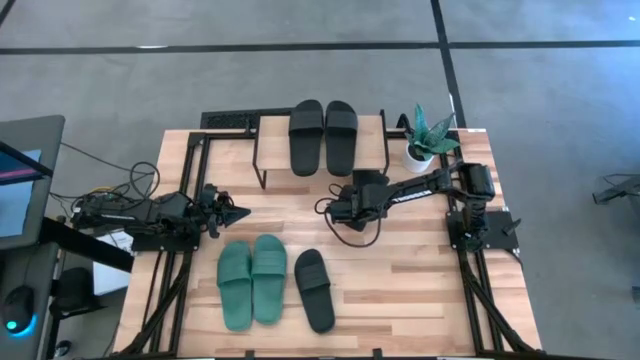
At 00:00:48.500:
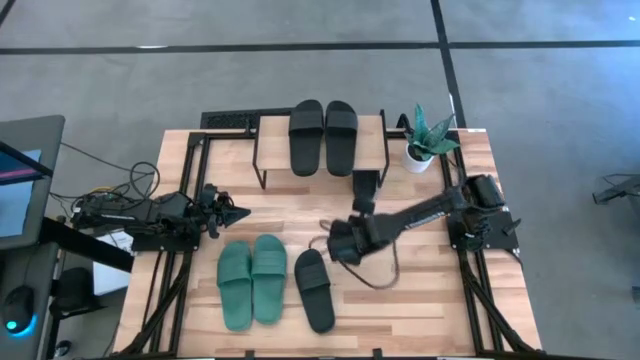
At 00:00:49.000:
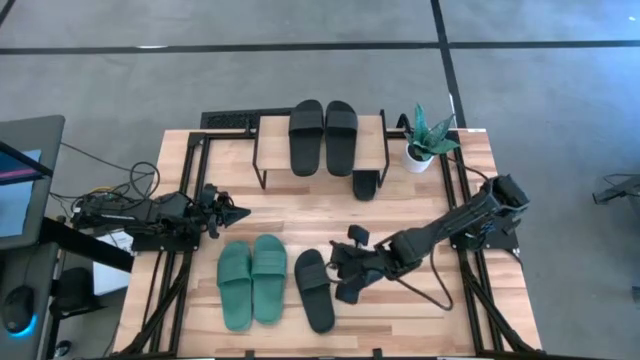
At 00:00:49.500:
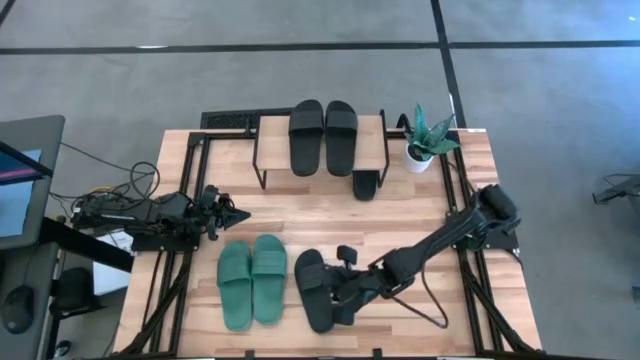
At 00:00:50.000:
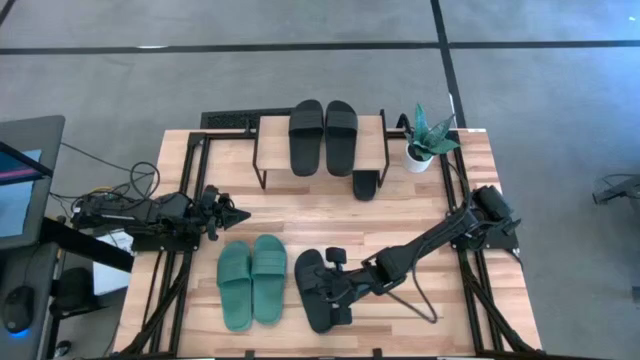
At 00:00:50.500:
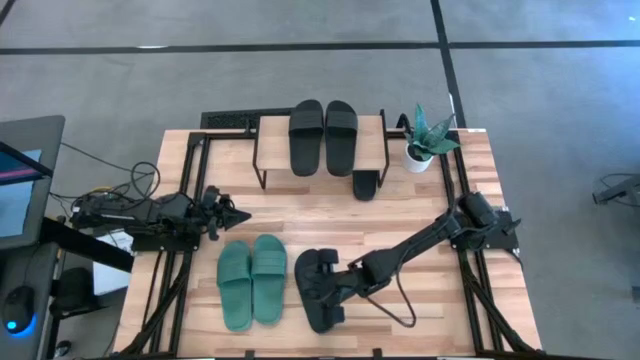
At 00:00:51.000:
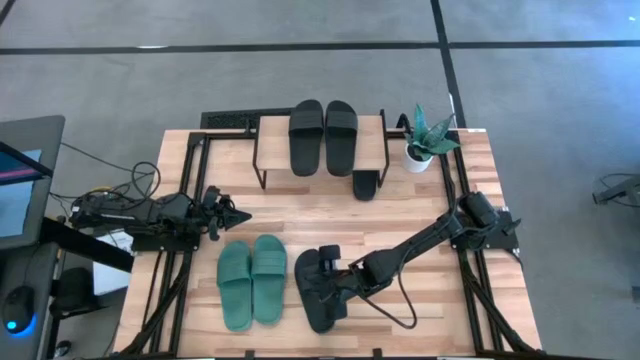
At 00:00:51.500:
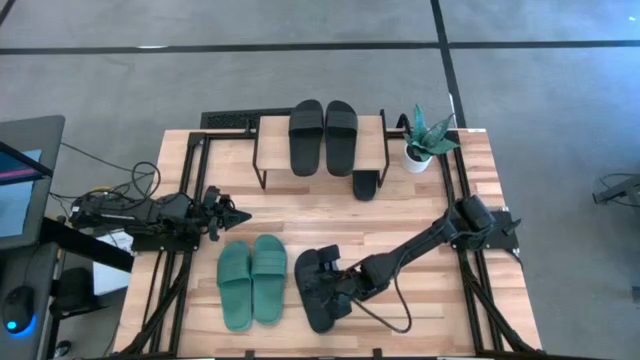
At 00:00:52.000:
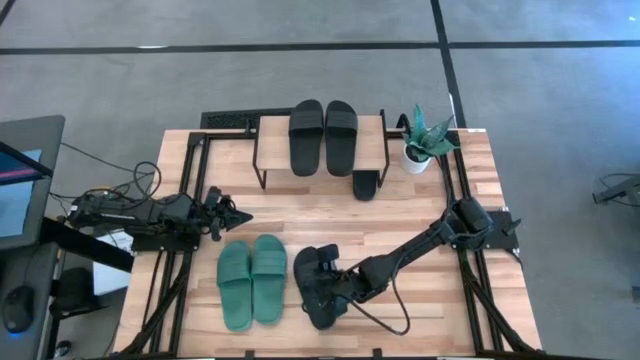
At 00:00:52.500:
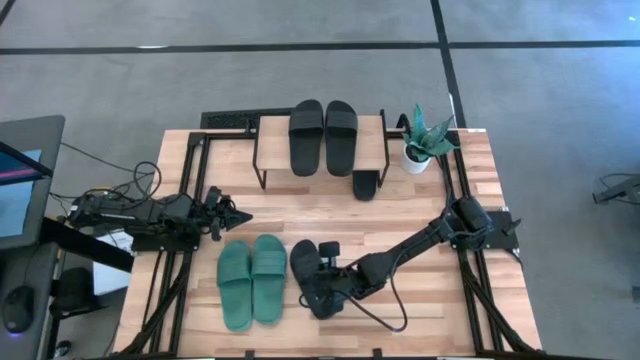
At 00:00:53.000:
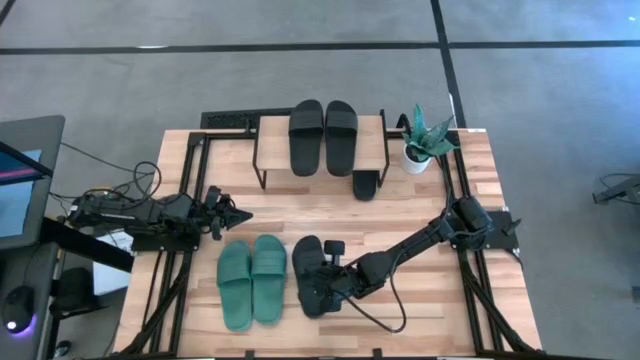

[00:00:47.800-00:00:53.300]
Task: Pick and place slides into the shelf
Put the black slide under the shelf

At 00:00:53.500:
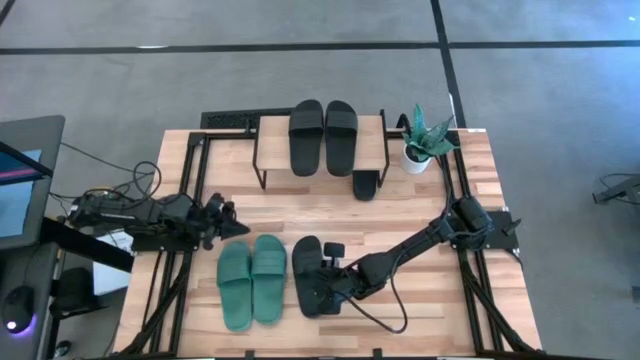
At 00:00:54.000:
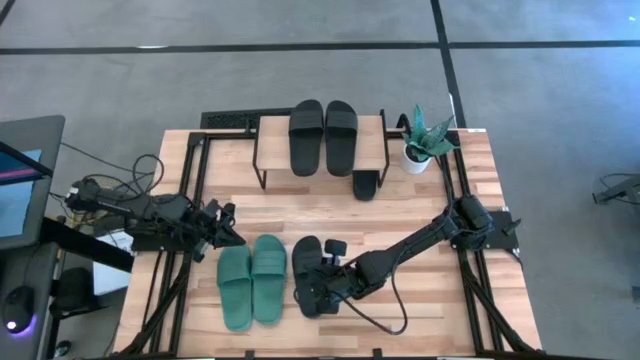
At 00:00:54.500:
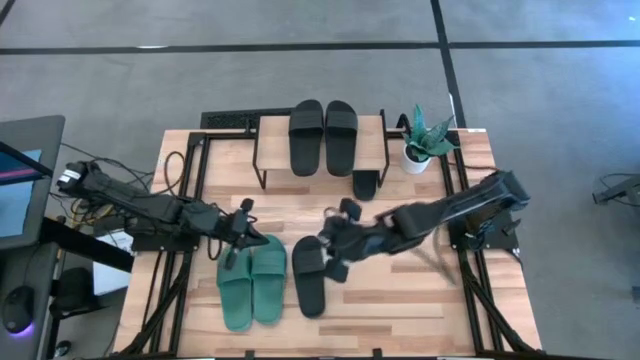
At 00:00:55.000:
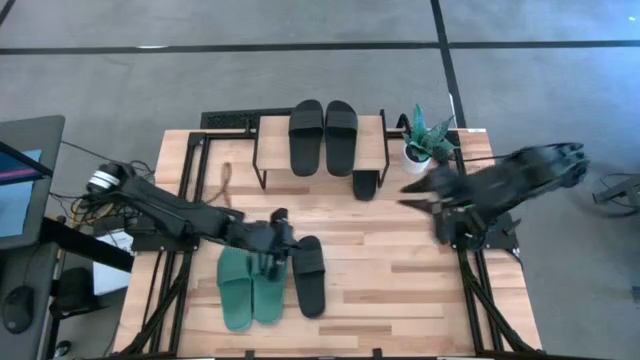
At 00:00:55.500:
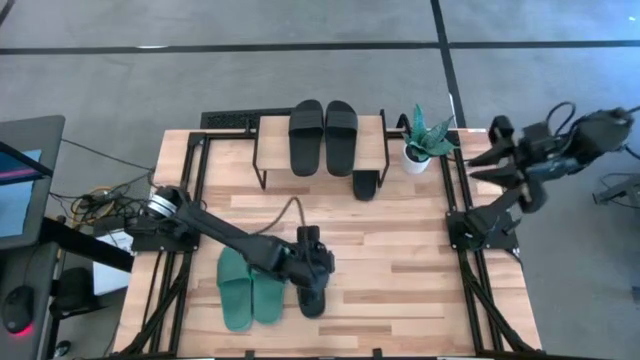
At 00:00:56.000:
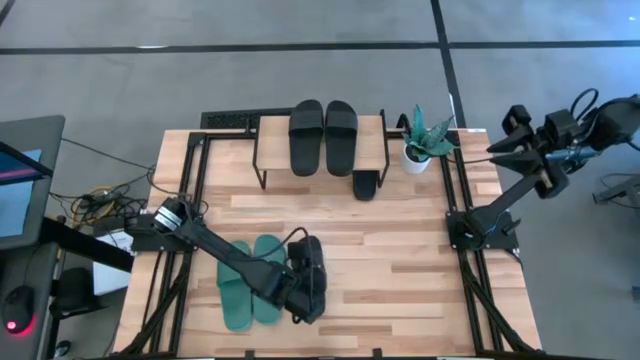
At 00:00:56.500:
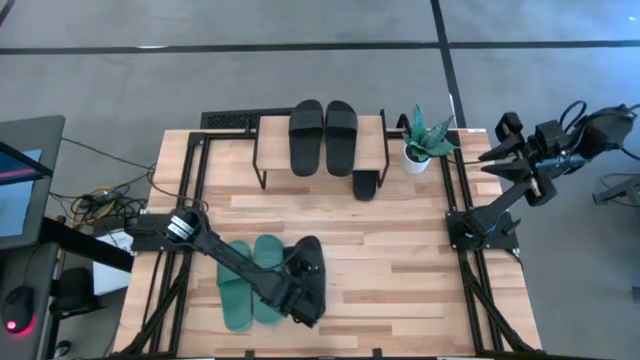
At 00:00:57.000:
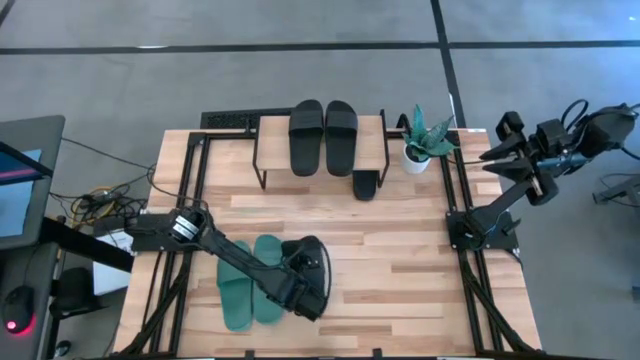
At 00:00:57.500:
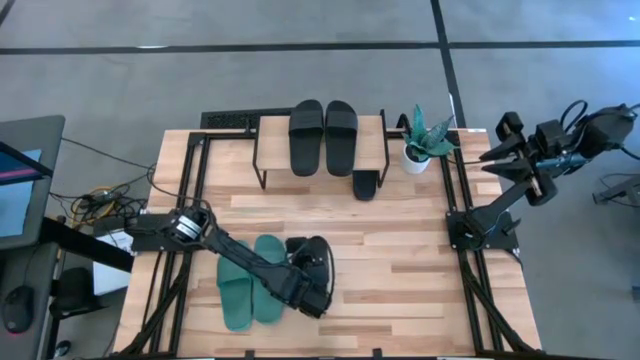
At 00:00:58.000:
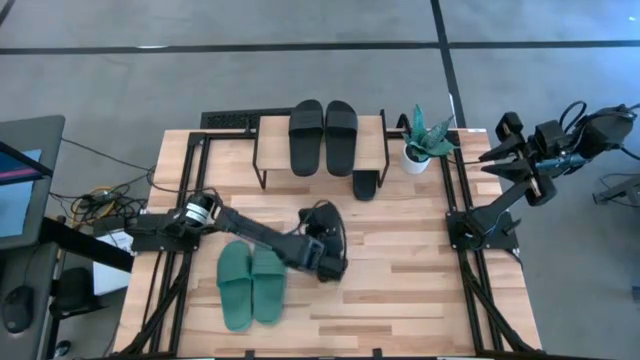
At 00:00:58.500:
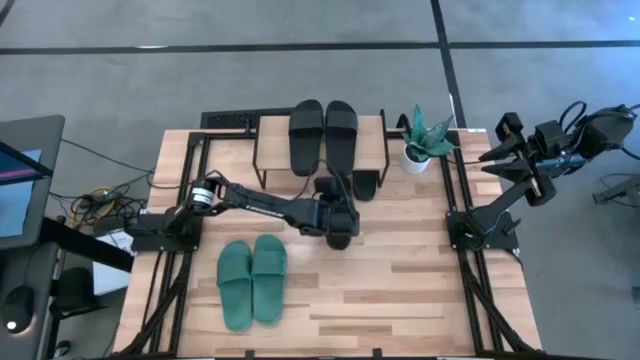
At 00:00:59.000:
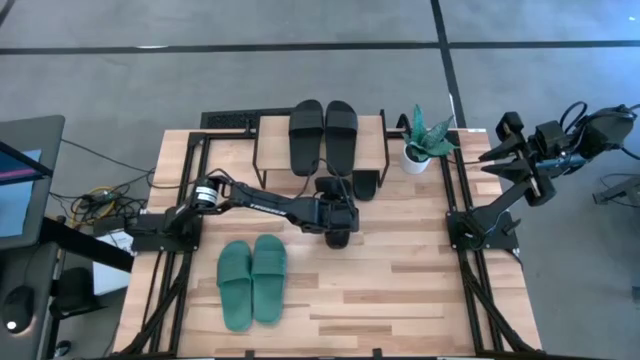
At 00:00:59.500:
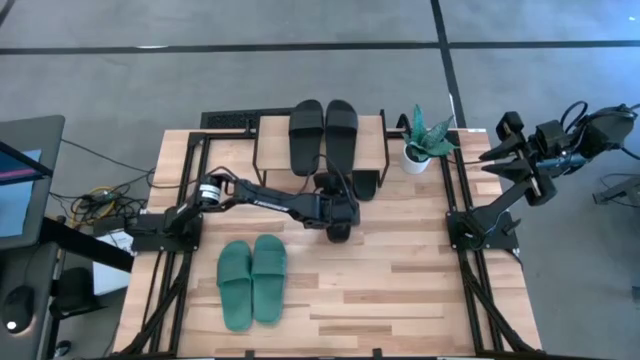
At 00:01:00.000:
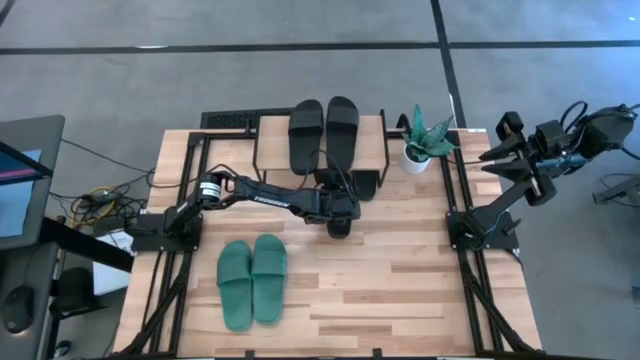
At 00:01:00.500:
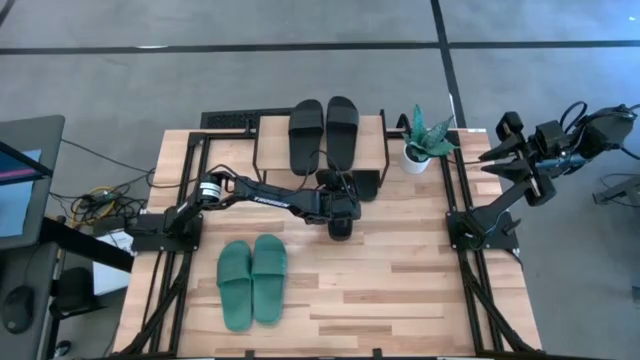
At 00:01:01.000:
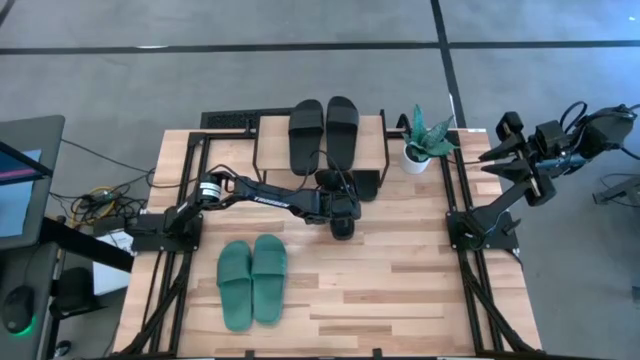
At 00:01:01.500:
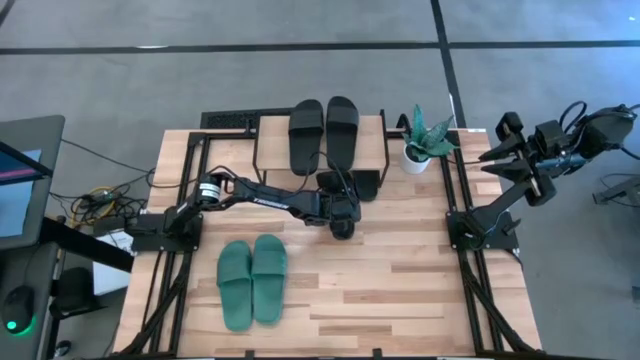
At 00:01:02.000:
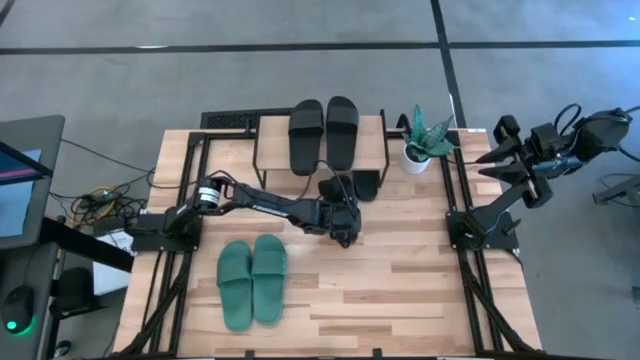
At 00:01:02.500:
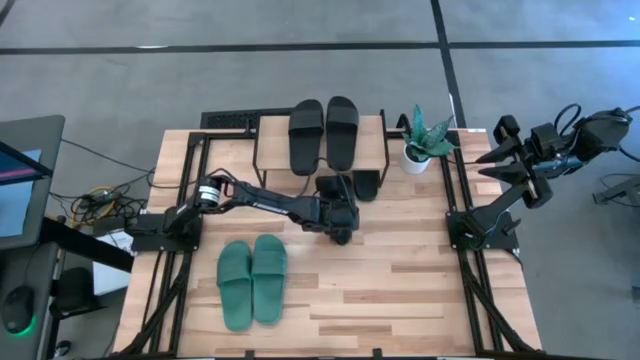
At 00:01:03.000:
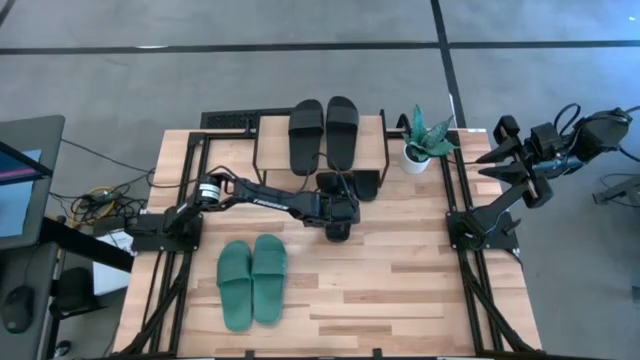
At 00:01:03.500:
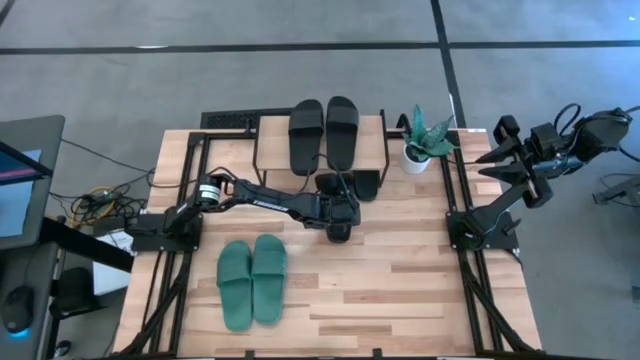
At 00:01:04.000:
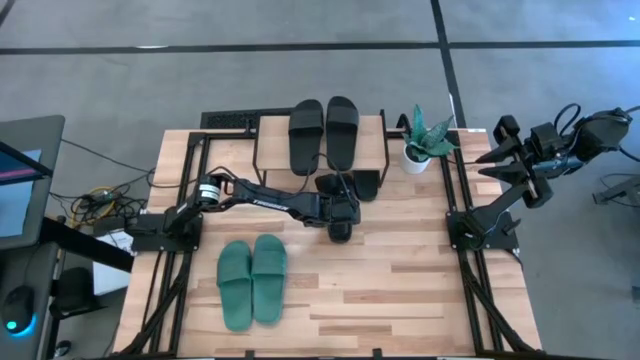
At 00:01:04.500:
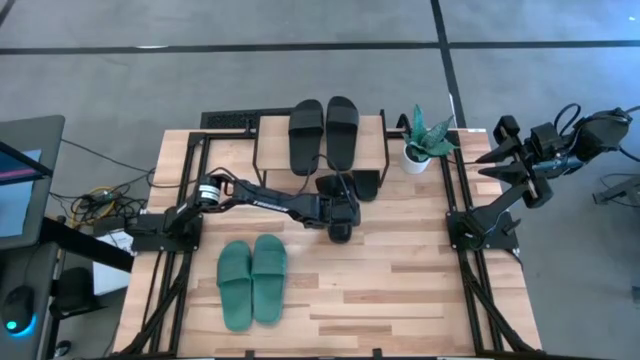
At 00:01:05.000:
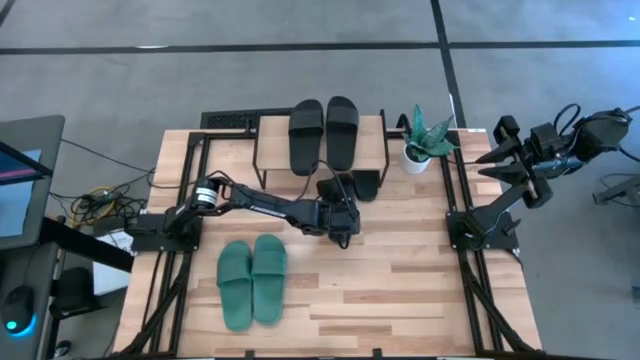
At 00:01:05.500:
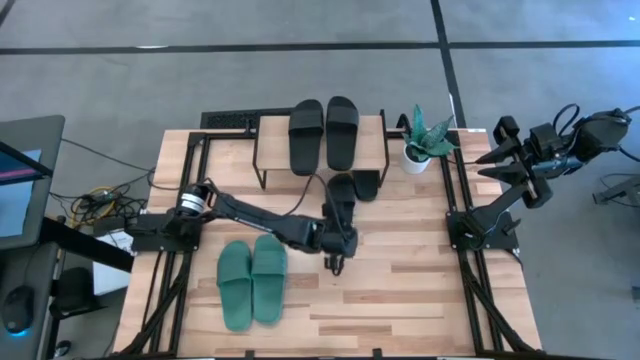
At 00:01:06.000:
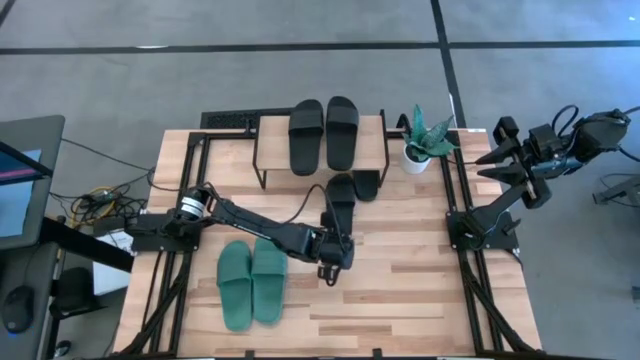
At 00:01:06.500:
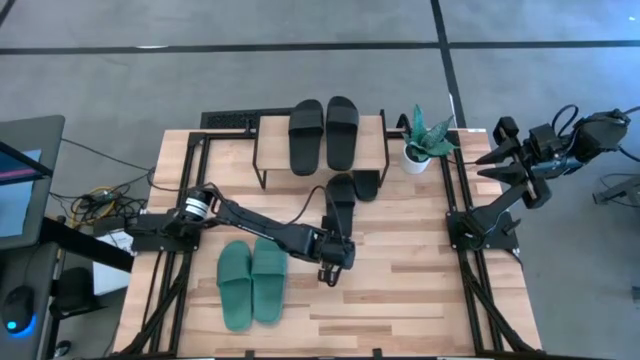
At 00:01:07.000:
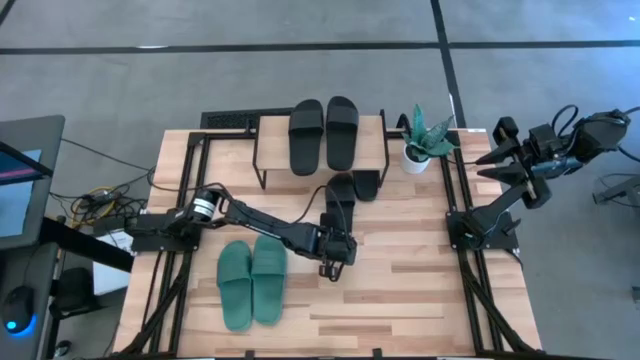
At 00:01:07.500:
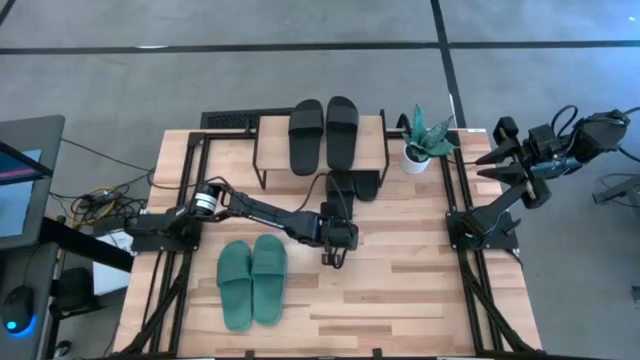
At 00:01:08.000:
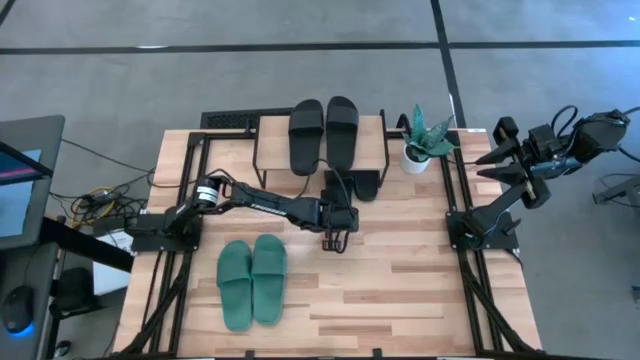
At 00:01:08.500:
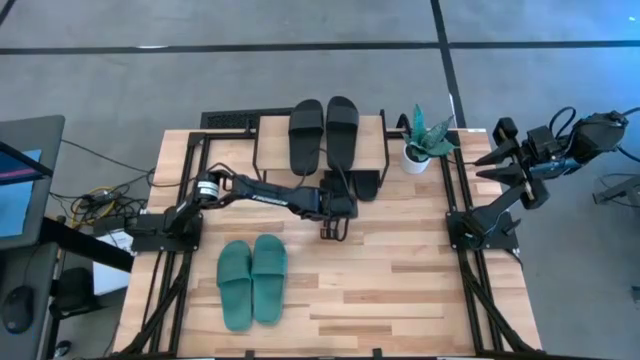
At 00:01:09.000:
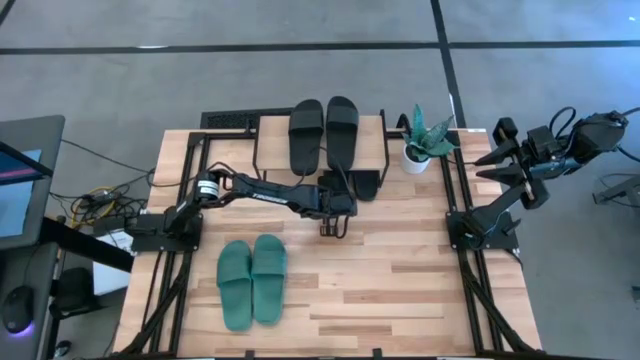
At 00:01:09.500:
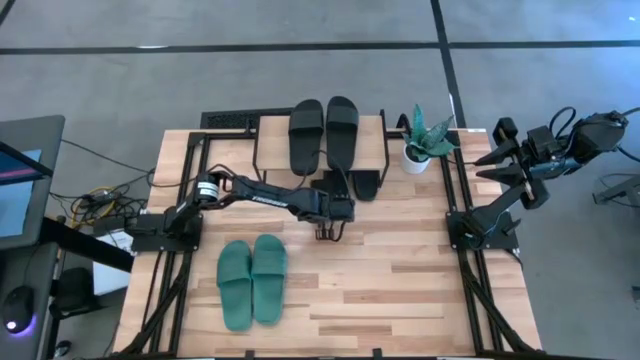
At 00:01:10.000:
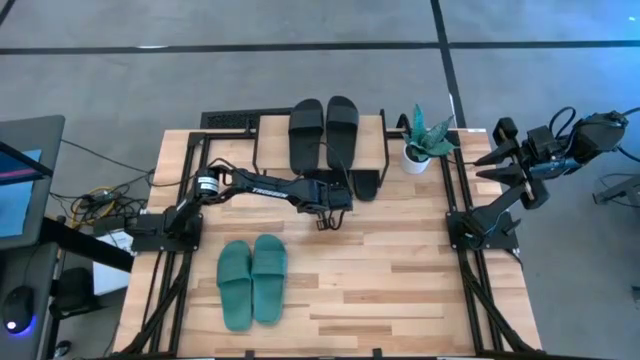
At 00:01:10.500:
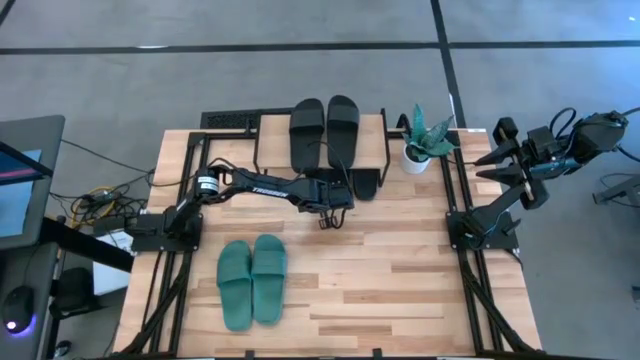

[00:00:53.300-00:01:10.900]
Put the black slide under the shelf
